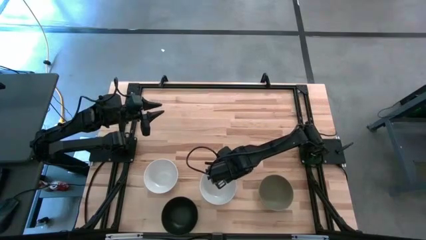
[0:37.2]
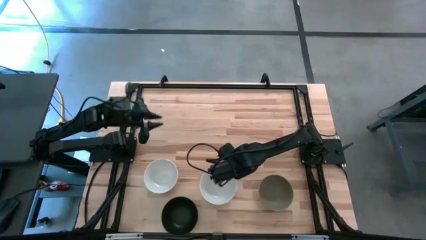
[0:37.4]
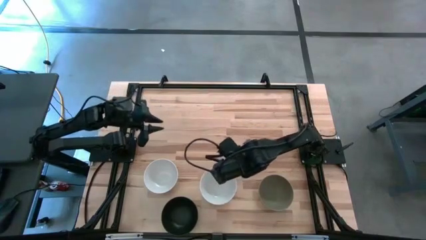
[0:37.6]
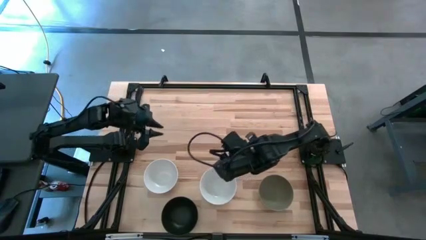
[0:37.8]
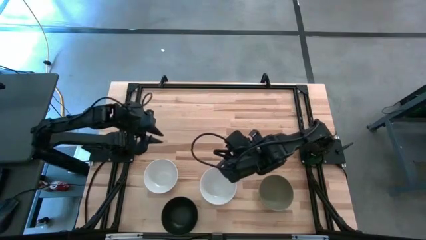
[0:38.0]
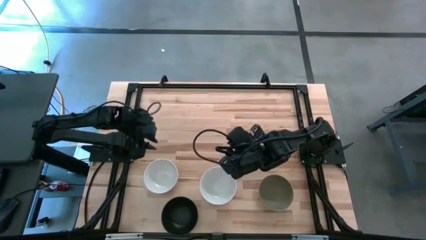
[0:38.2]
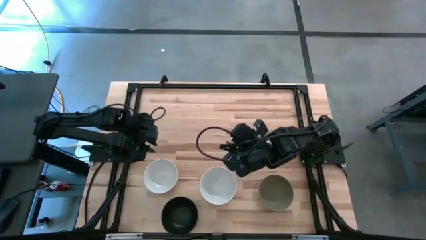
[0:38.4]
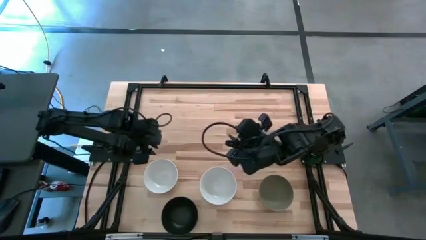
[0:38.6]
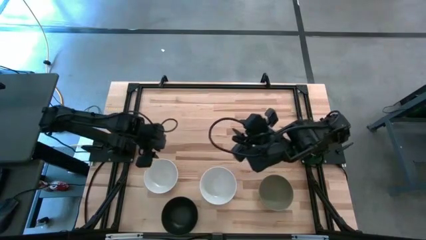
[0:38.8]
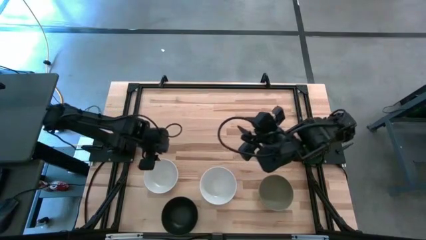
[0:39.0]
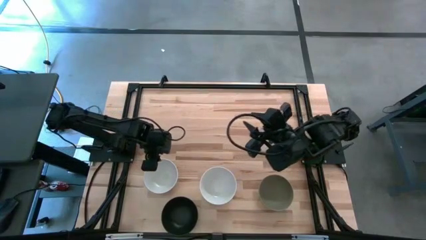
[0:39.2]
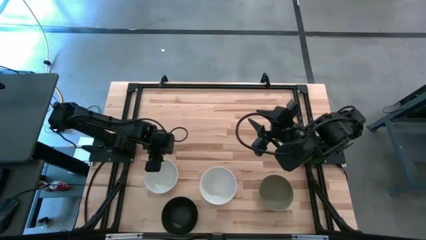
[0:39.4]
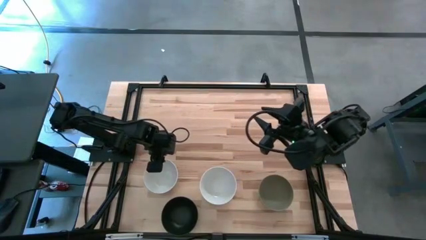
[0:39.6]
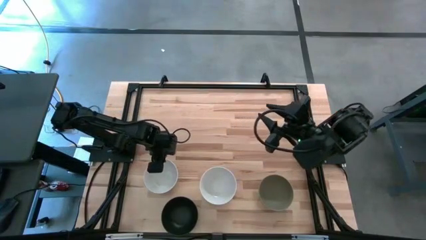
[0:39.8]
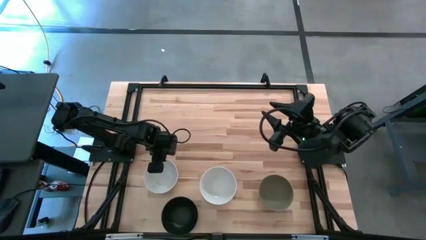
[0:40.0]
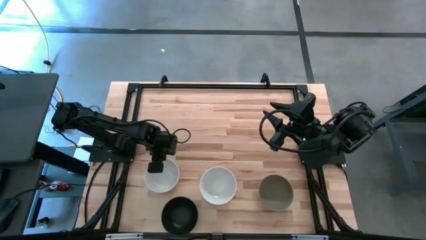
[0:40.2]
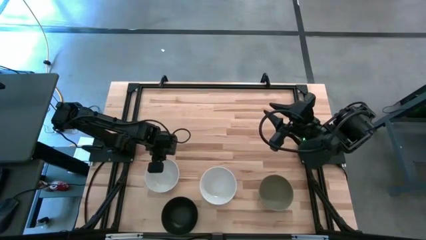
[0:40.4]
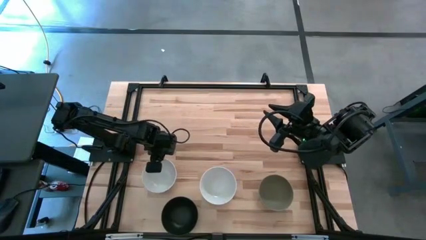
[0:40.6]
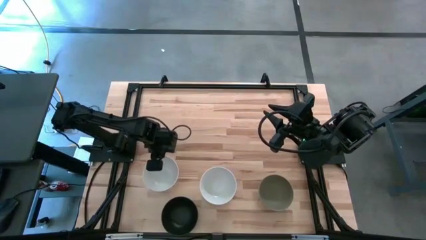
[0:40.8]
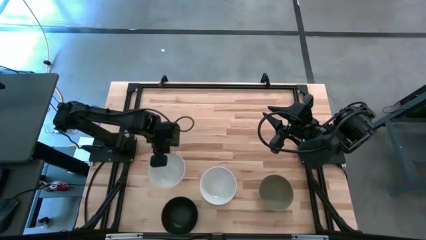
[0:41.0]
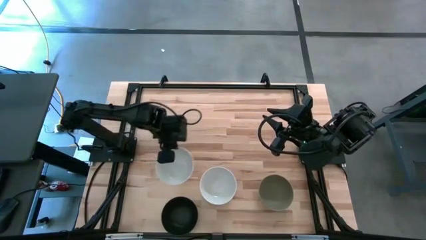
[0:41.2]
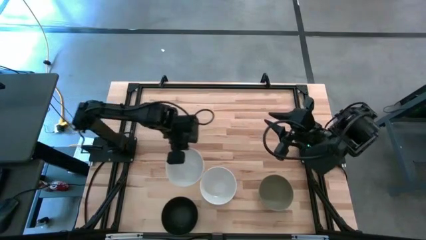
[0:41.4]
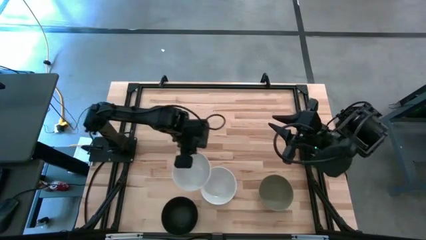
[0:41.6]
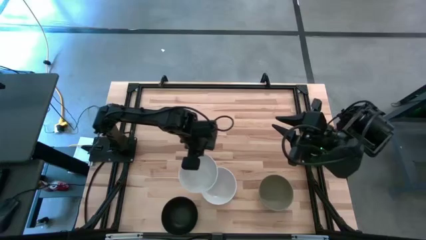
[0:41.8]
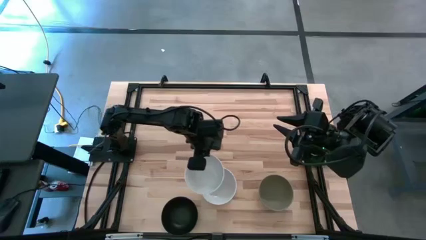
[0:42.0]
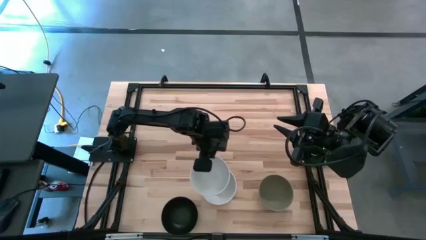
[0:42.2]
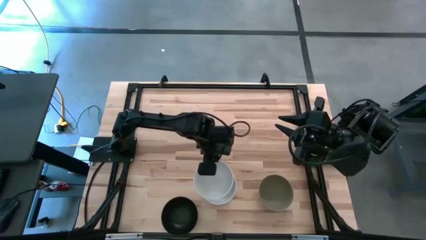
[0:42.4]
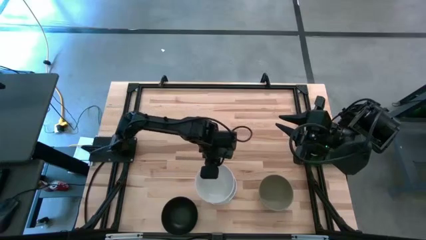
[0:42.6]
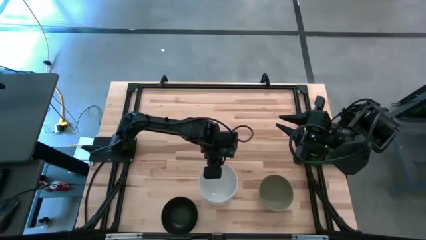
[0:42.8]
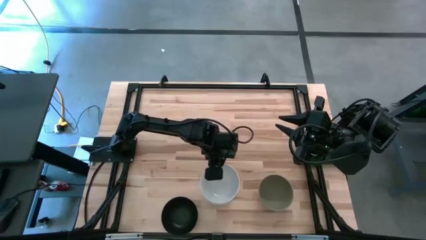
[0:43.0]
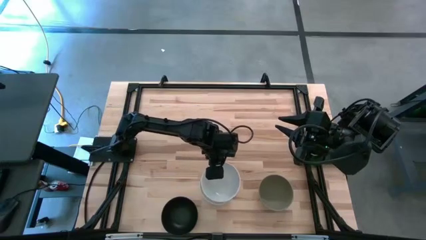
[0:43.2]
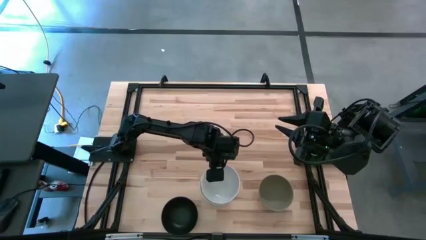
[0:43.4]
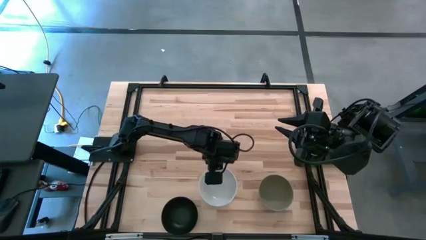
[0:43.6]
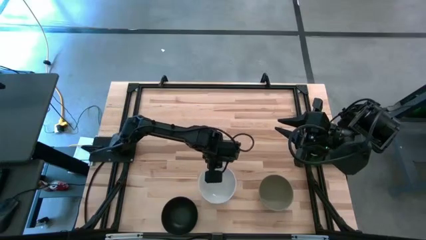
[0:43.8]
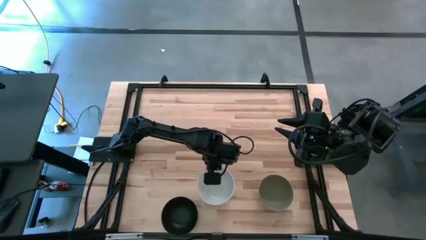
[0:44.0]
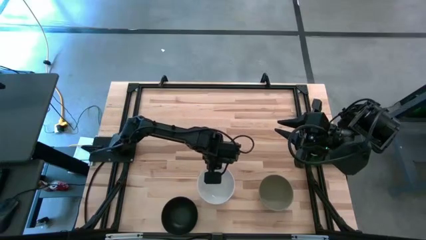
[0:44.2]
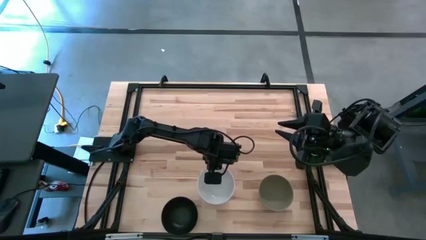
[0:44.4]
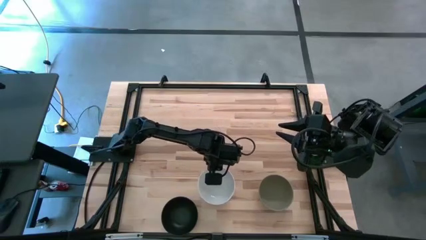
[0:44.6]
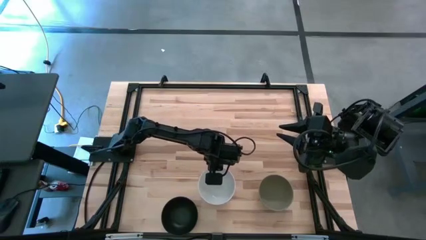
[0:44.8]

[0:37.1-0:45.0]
Task: Nest bowls inside each other
Stack the white bowl on top of the white bowl

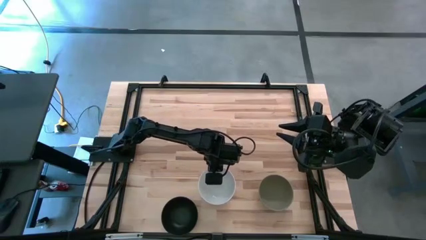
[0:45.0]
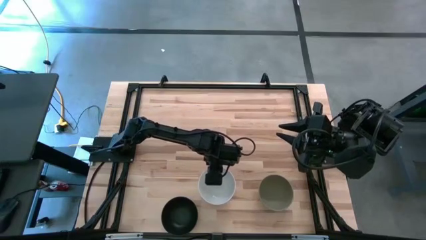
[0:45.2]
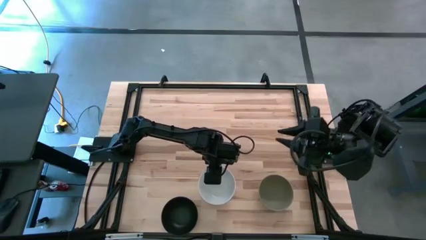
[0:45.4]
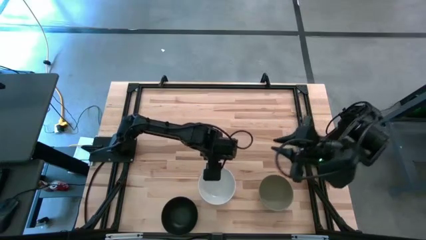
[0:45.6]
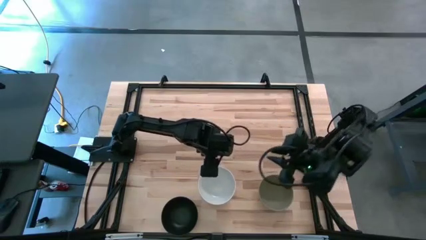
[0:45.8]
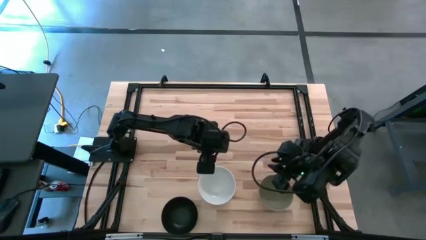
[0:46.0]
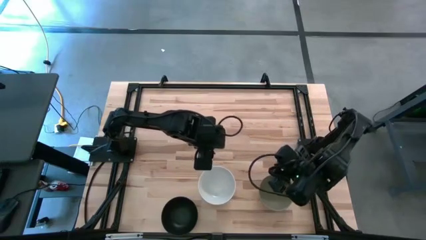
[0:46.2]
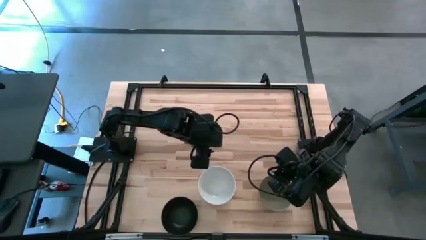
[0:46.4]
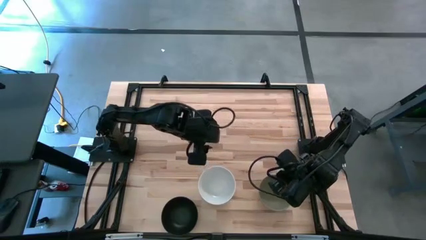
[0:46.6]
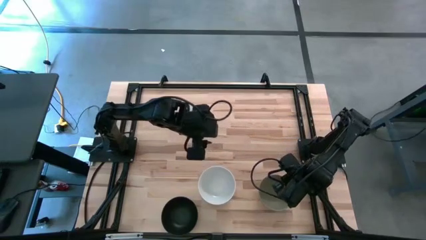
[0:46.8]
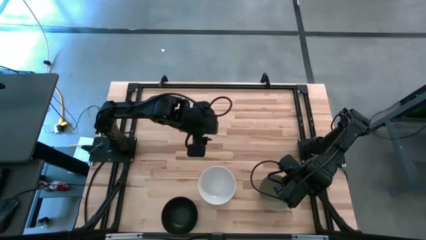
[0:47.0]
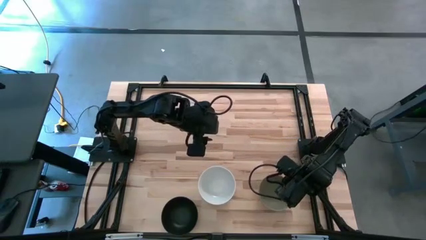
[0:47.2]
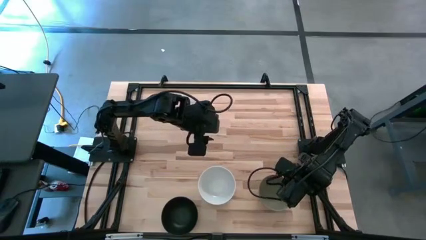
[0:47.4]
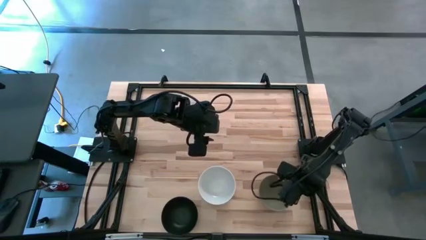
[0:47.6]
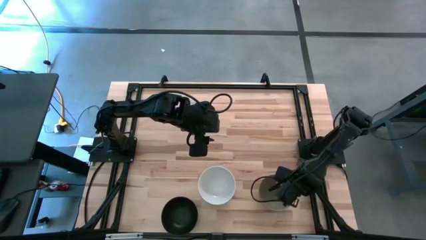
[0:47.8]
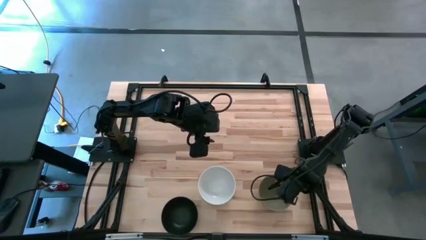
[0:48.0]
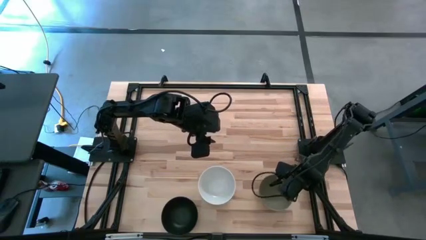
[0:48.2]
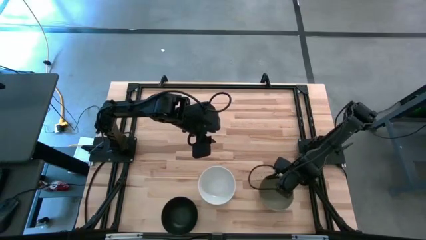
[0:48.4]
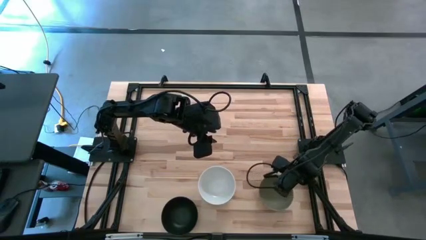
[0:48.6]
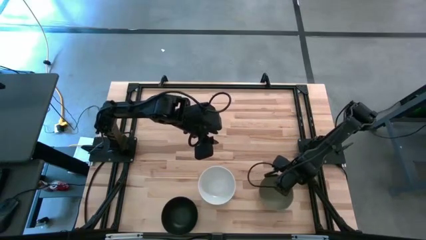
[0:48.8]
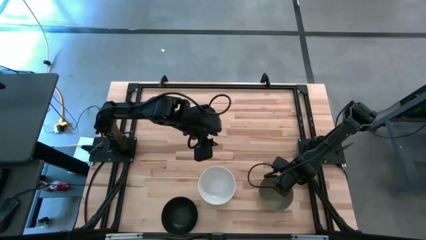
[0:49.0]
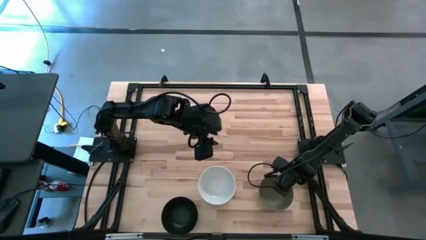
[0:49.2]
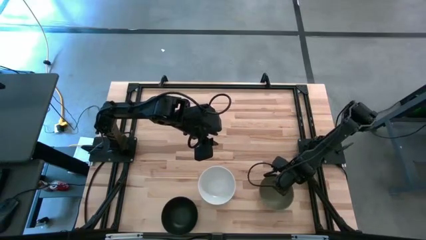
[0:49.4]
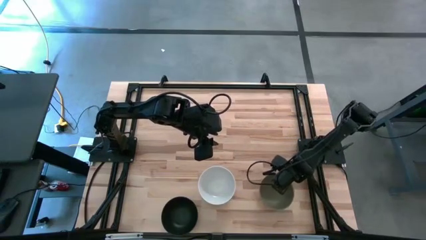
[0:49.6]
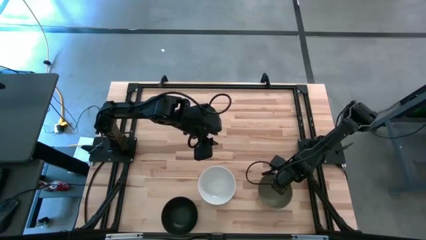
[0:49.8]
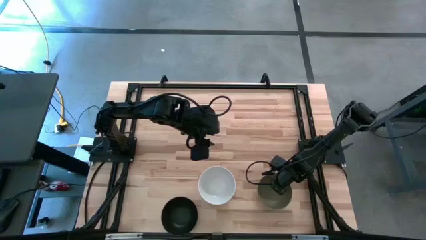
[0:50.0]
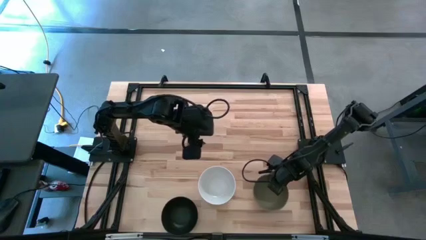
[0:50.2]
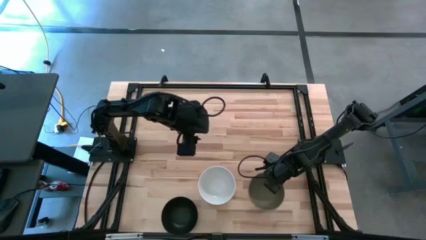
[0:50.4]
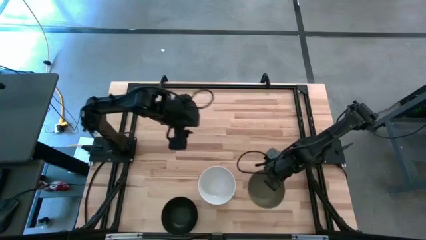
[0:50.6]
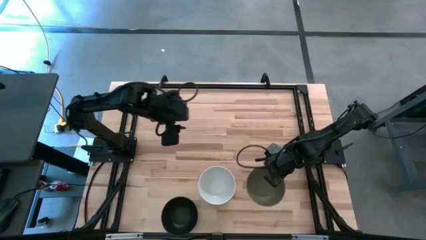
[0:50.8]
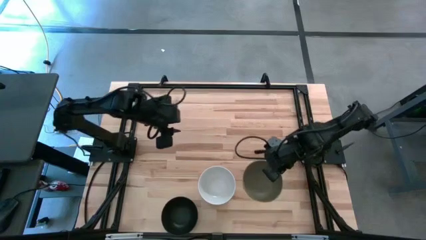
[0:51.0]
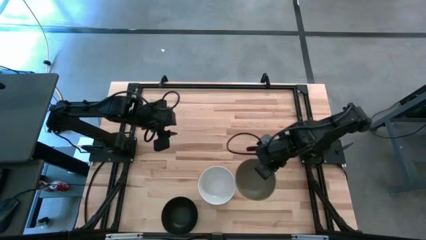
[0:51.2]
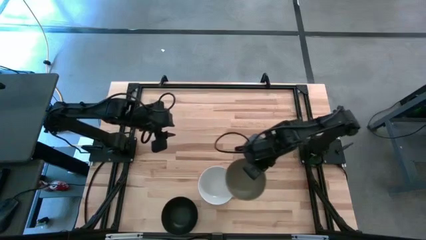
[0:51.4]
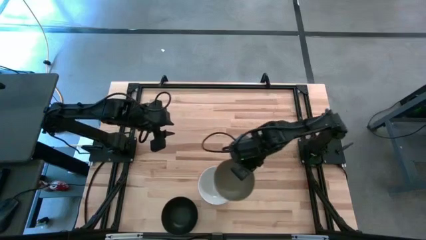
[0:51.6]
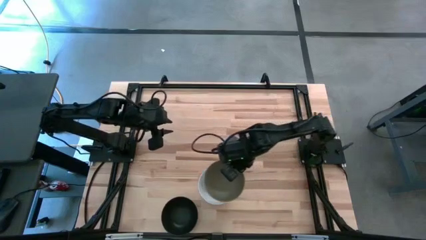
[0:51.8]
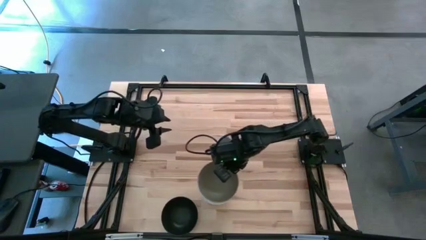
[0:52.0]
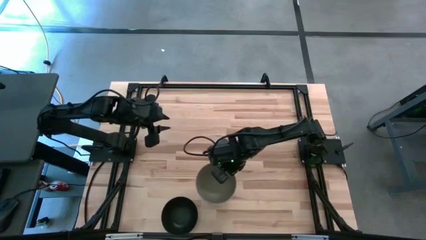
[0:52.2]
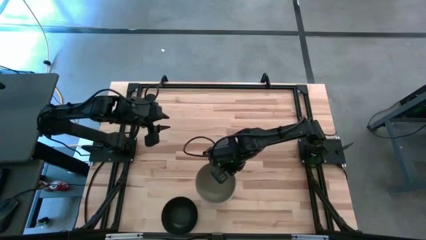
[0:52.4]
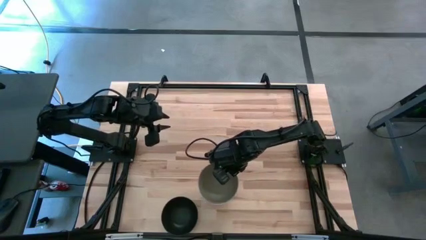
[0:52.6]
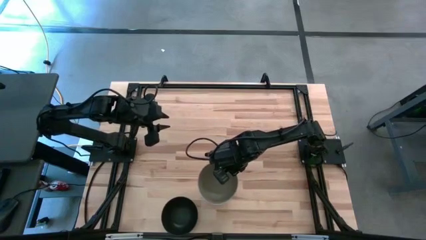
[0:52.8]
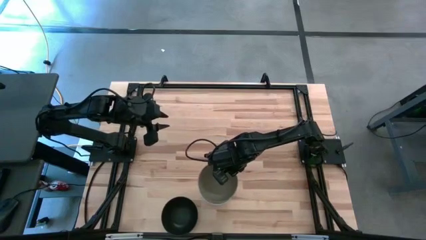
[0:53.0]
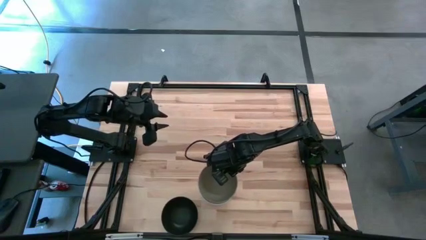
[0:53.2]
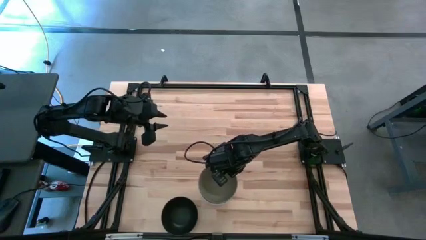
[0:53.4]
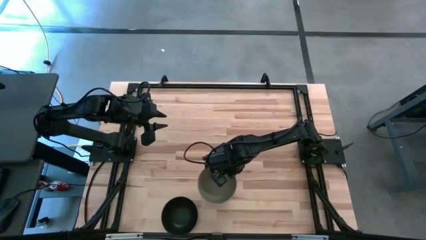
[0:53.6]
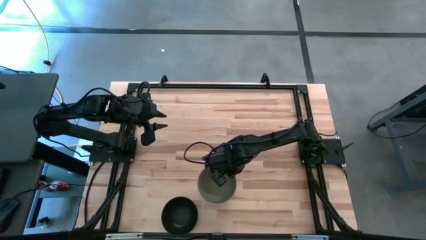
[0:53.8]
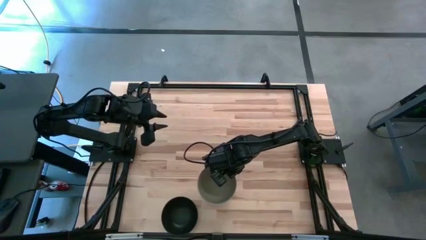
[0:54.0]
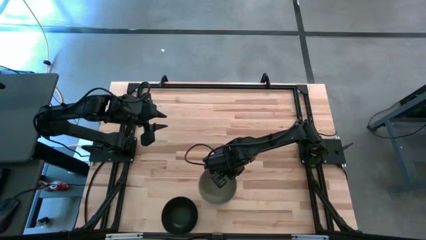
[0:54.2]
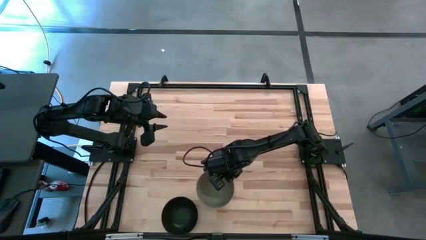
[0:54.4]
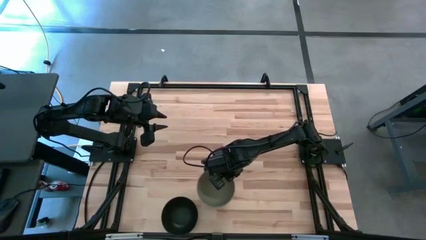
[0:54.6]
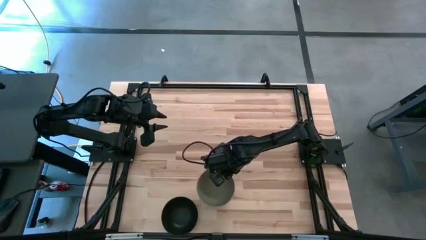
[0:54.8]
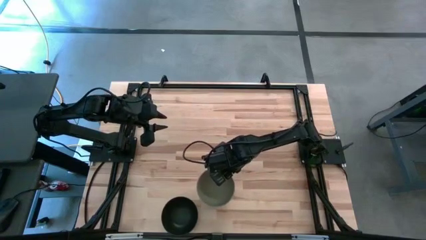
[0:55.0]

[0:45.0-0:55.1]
Stack the gray bowl on top of the white bowl
